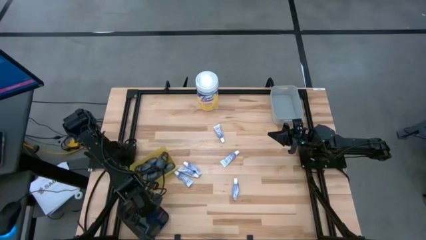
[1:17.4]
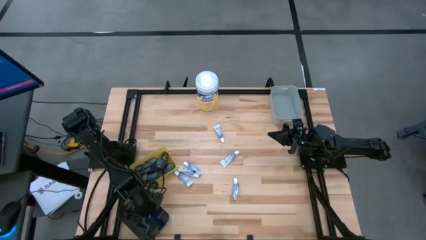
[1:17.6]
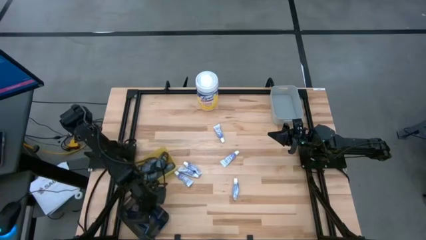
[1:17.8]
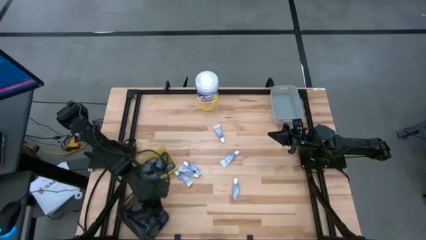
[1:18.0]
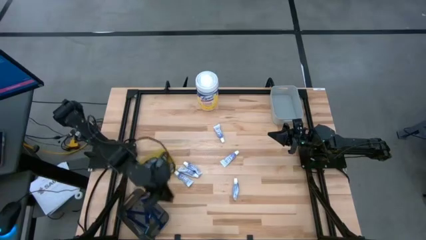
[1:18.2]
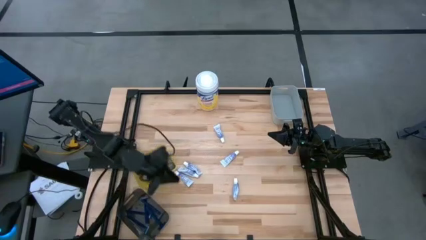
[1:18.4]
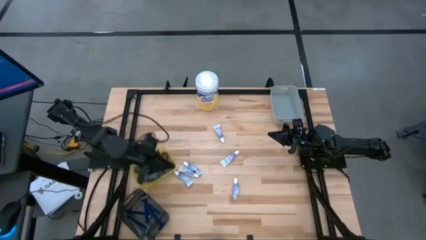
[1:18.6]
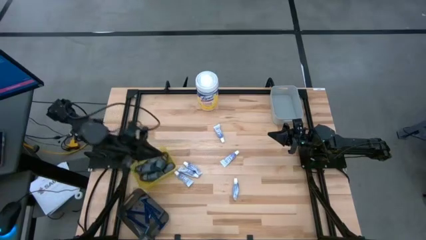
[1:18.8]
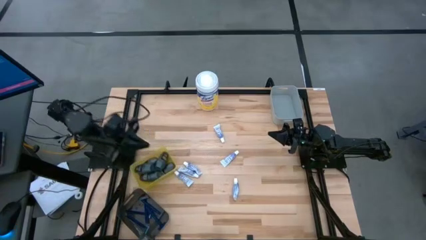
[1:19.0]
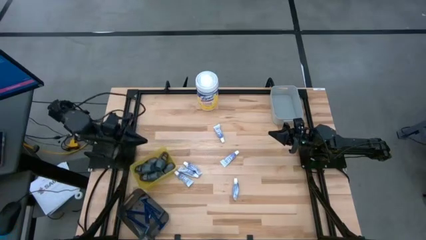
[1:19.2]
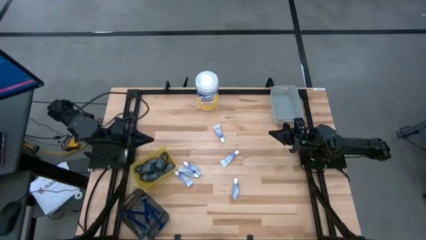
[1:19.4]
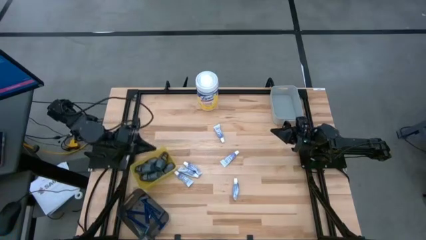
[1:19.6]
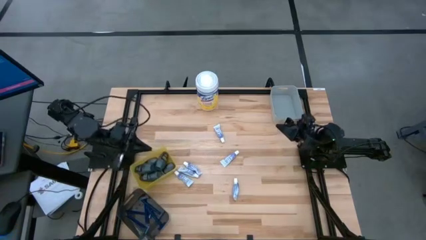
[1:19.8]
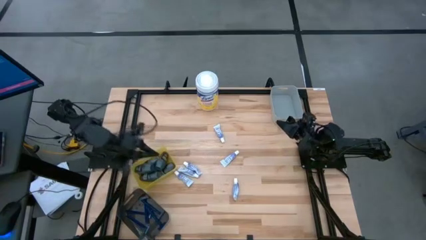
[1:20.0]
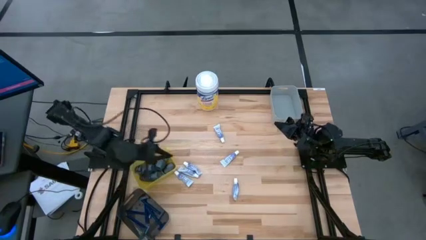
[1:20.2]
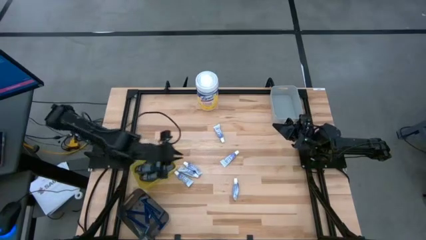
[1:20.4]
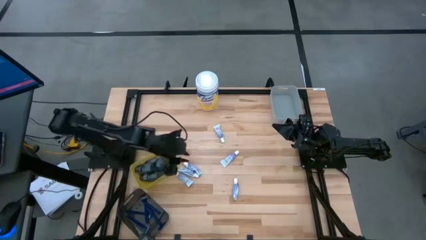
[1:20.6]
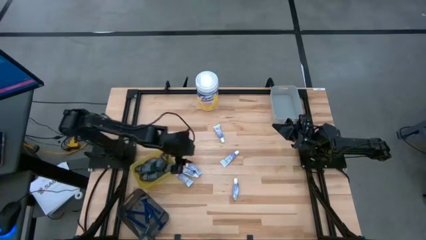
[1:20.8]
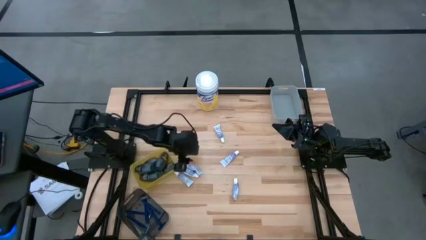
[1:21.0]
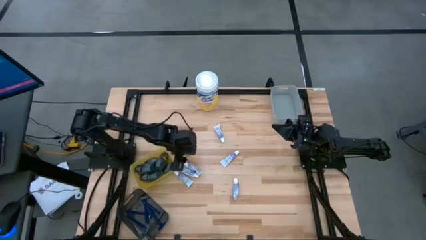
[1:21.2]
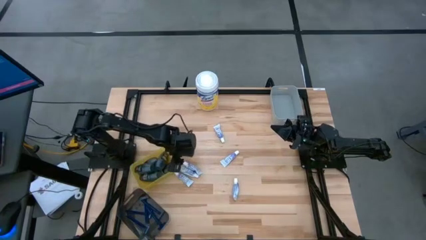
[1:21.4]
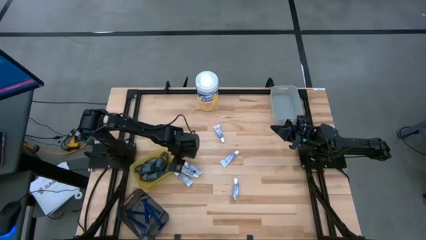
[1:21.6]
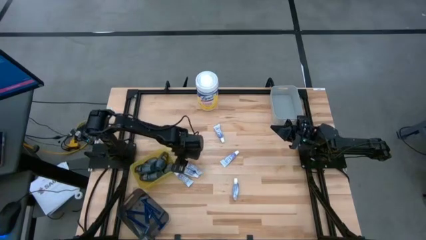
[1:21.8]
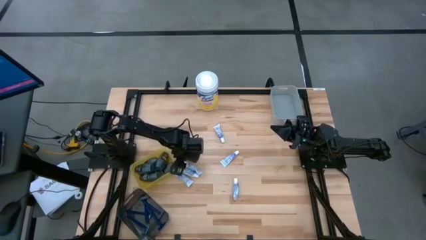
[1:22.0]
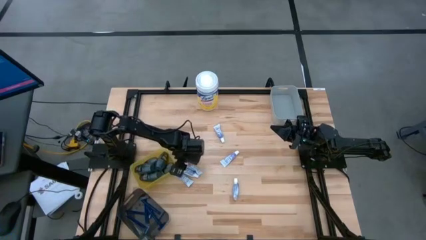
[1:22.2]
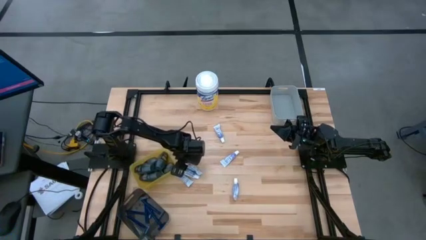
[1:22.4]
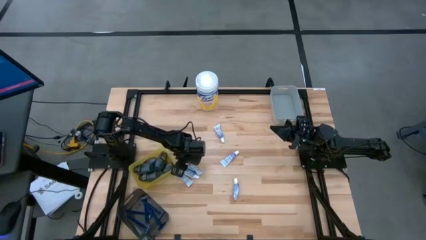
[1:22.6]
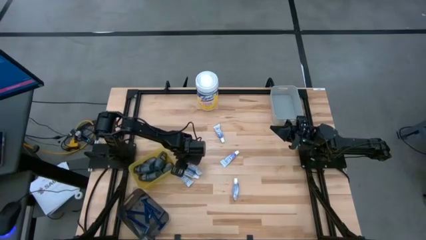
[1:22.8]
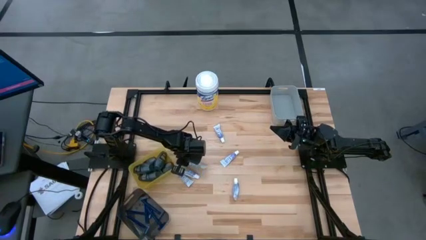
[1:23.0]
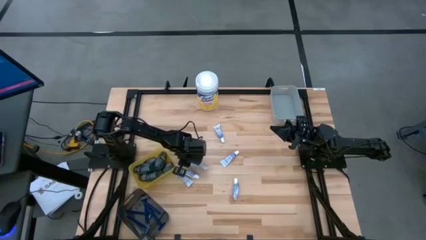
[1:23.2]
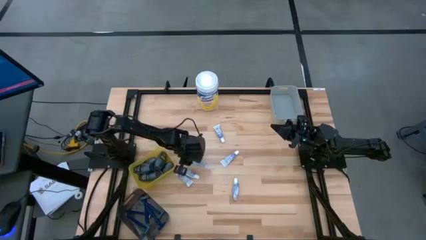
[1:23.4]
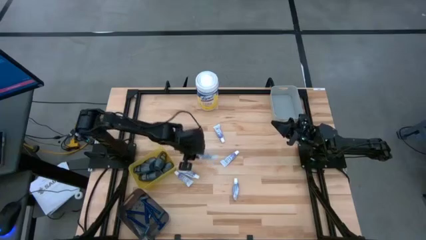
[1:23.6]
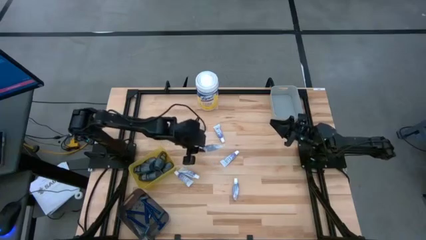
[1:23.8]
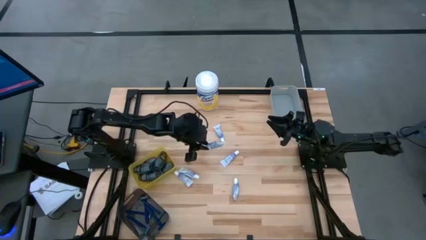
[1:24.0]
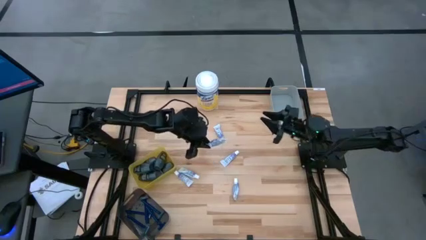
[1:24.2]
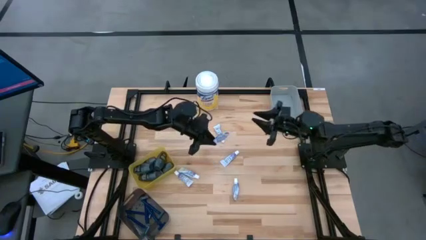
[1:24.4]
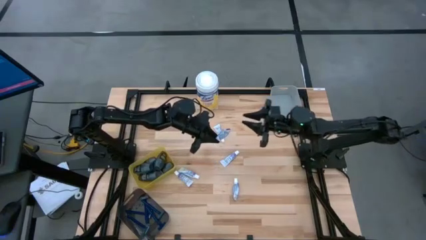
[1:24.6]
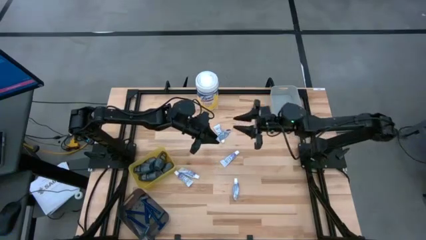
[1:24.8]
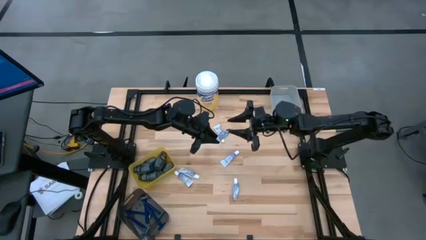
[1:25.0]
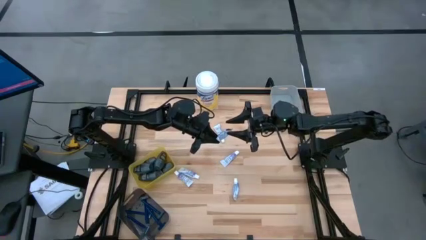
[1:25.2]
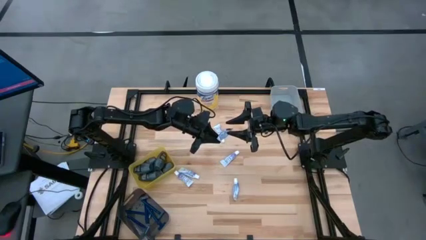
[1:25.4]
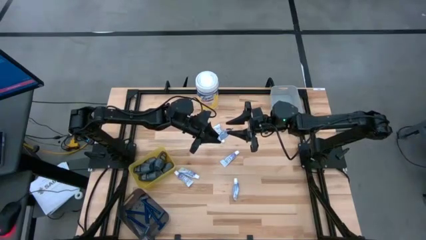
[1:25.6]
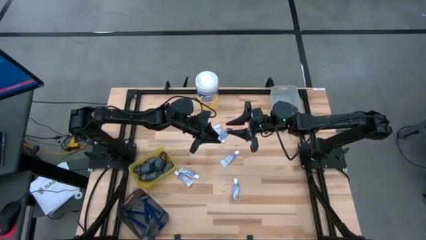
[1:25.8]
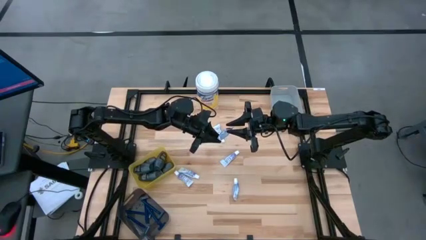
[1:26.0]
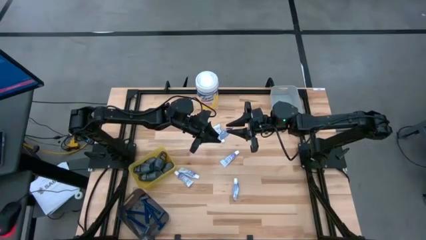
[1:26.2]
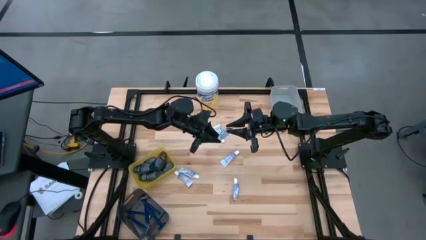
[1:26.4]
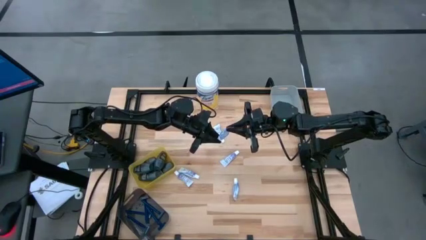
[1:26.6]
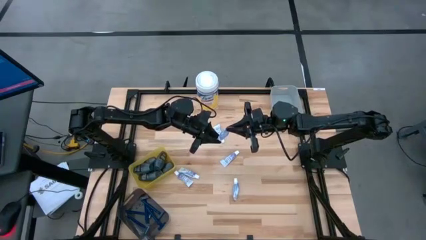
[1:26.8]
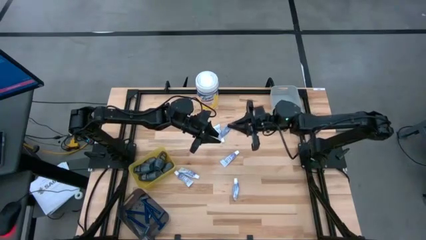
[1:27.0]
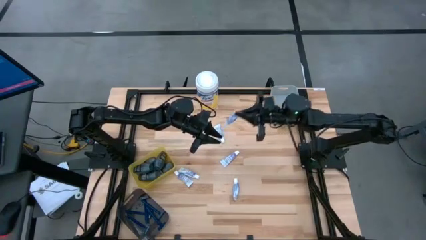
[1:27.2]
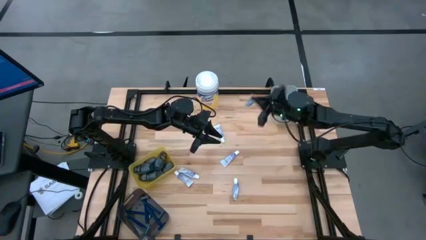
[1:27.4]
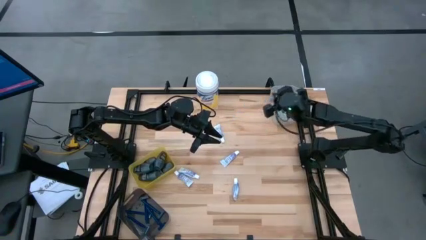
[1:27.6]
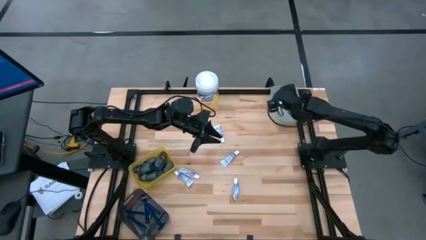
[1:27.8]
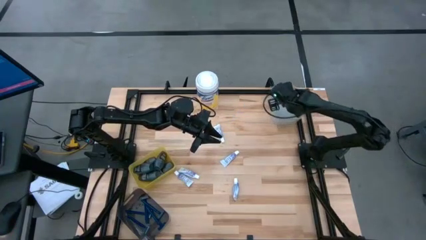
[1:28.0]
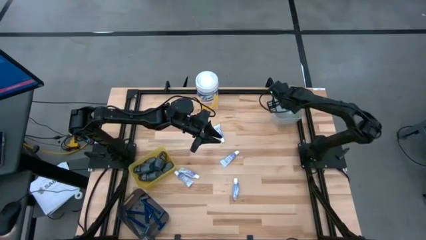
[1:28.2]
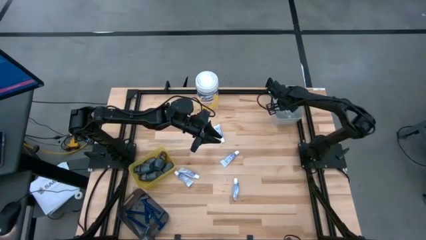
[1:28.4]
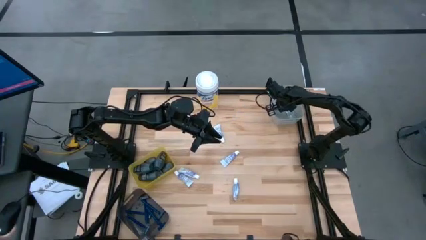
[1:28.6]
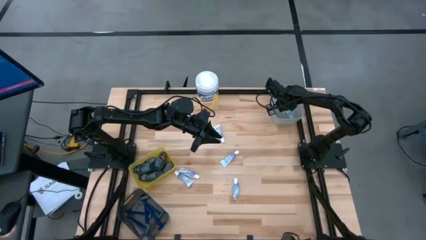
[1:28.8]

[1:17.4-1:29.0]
Task: Pick & Place Travel size toiletries
Put the white toothpaste into the gray bin
